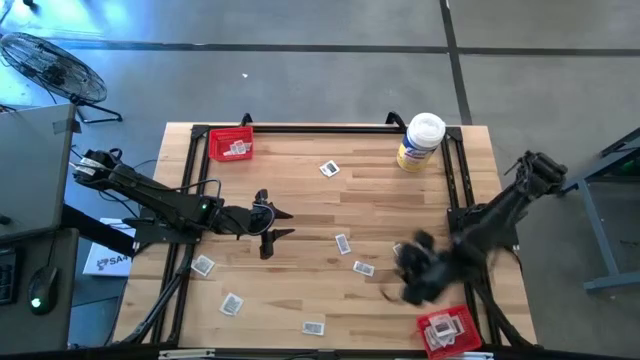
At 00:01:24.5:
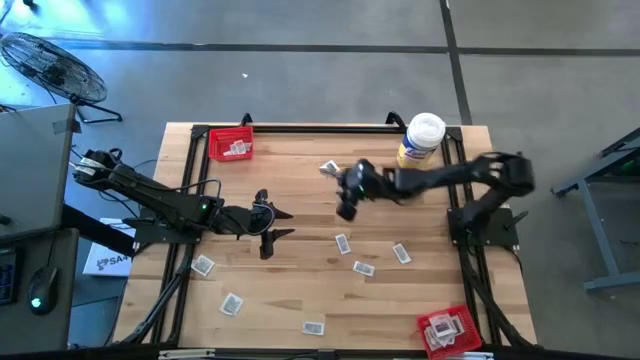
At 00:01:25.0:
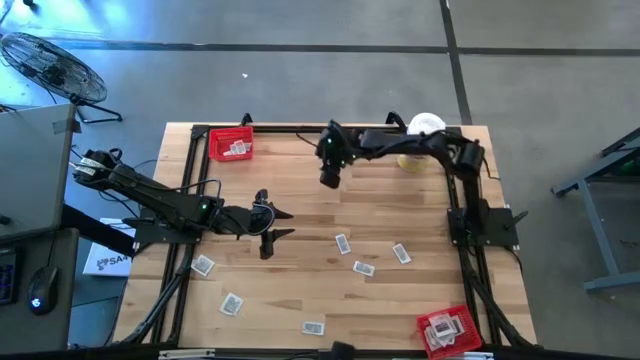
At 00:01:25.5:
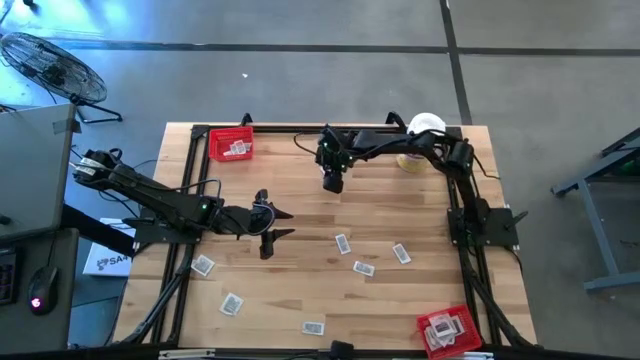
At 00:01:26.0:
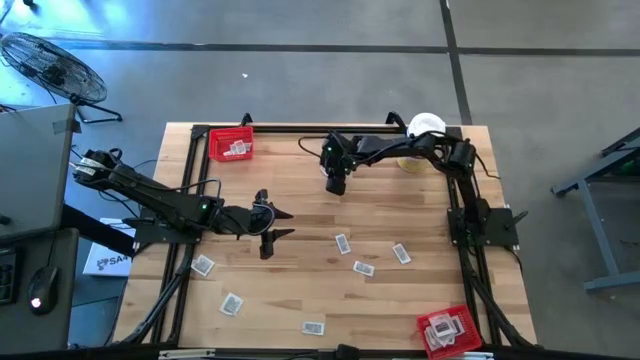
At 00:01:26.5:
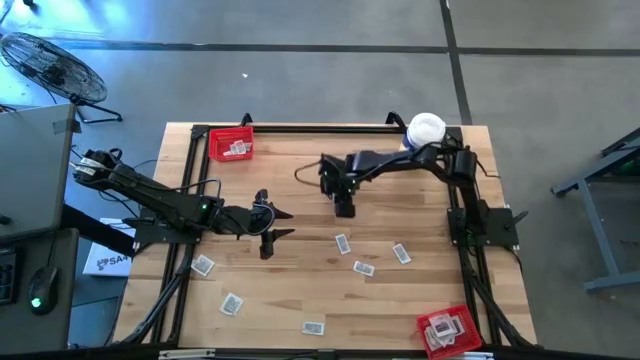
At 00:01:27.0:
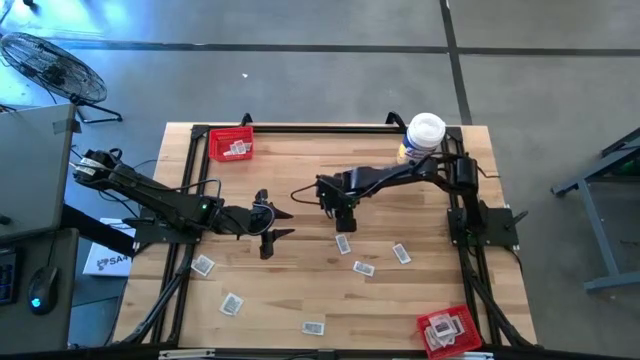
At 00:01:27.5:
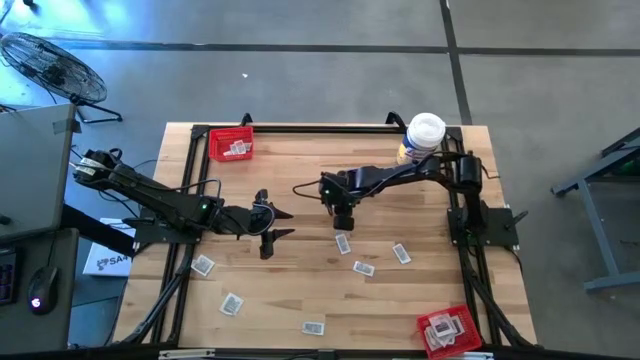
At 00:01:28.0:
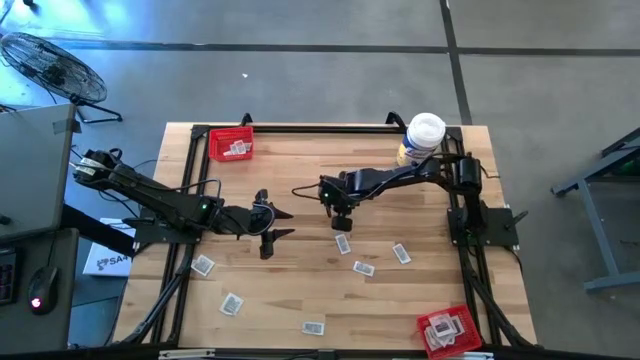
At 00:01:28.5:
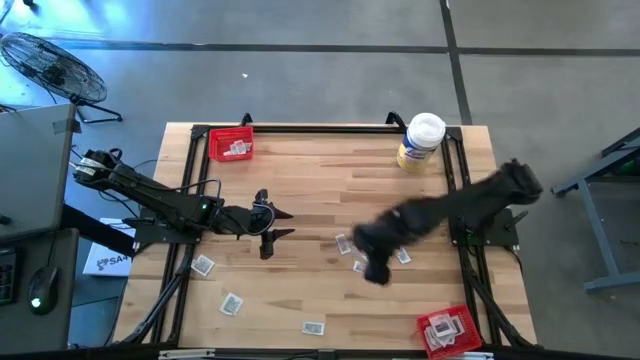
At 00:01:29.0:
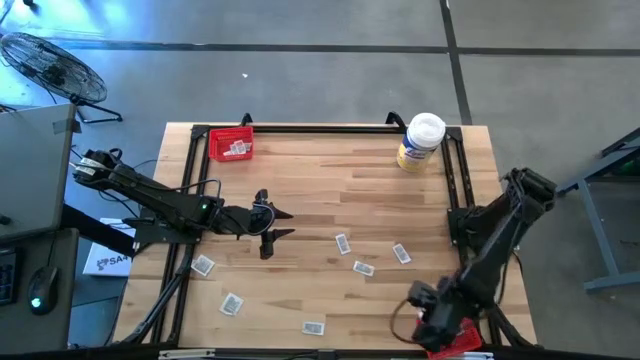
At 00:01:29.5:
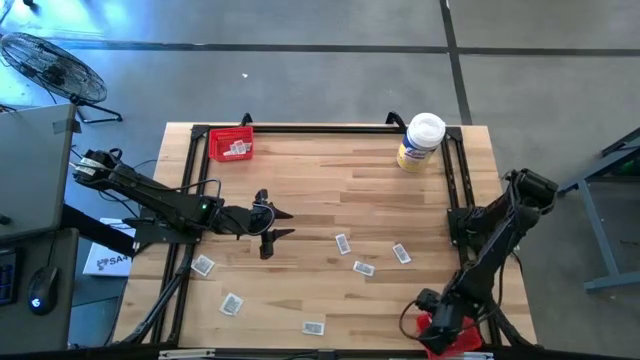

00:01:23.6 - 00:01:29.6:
Task: Pick & Place First Aid Supplies
Put the white and gray towelette pack into the bottom red bin

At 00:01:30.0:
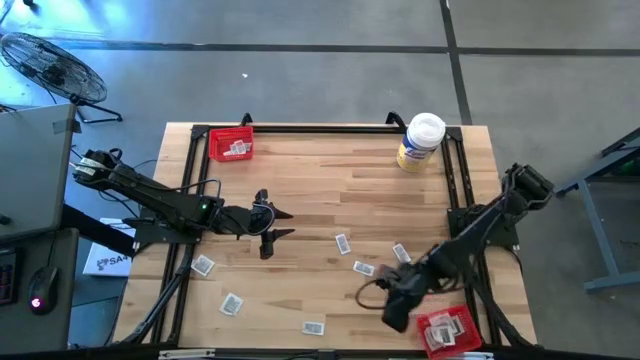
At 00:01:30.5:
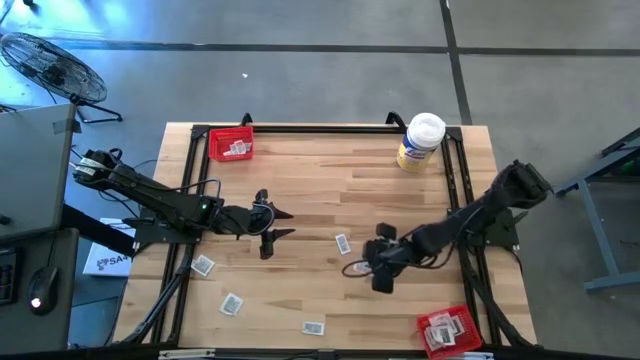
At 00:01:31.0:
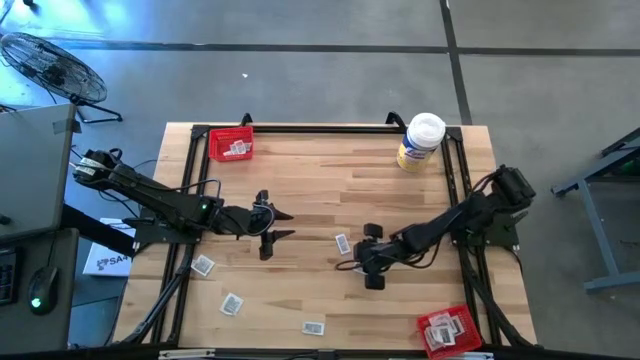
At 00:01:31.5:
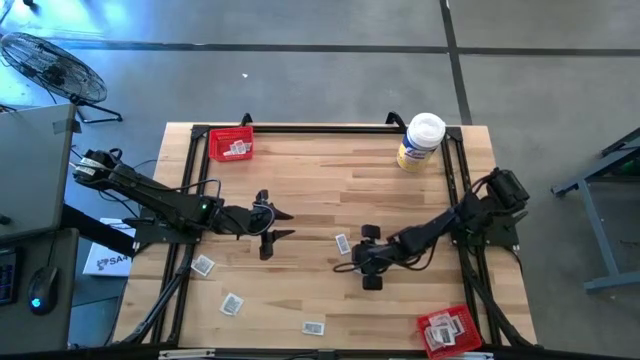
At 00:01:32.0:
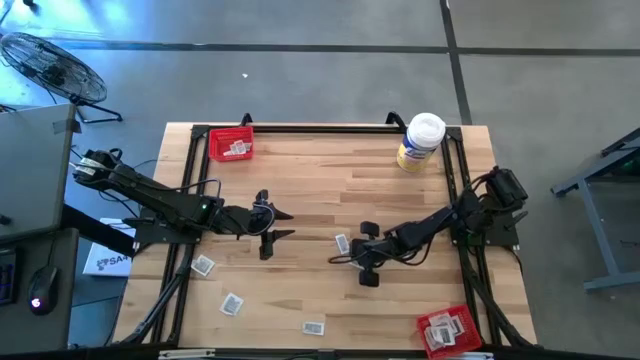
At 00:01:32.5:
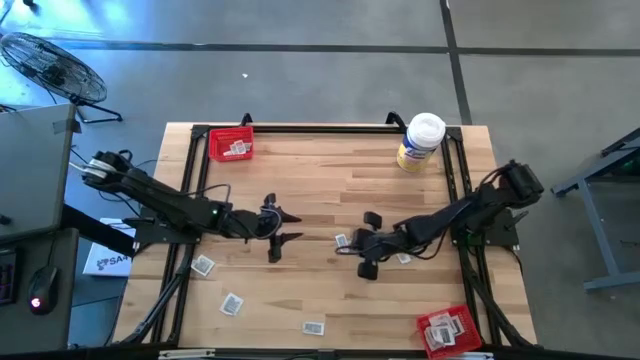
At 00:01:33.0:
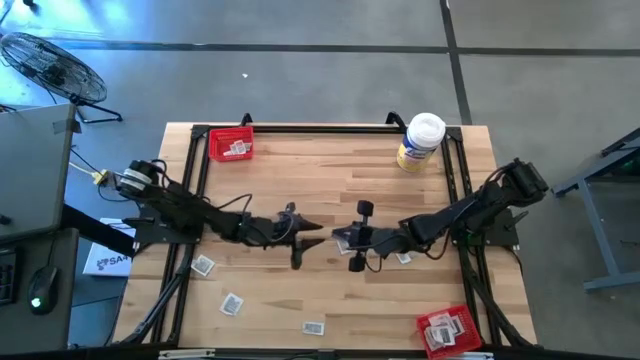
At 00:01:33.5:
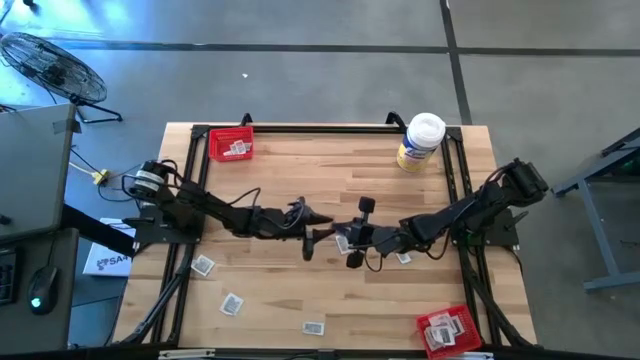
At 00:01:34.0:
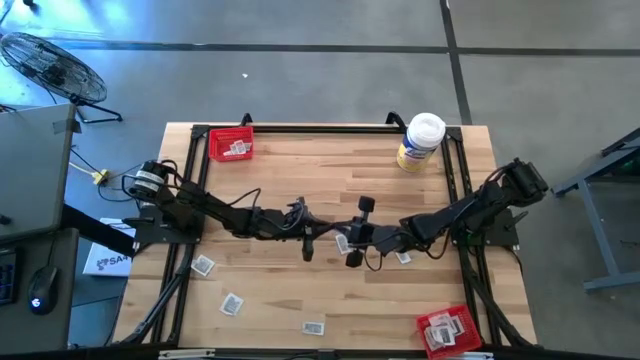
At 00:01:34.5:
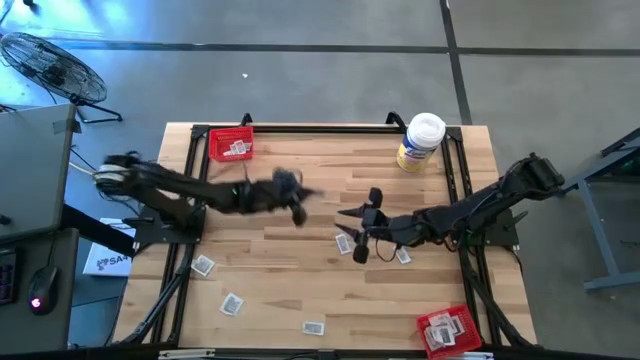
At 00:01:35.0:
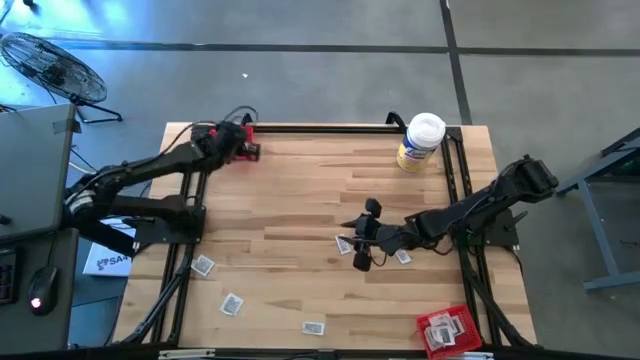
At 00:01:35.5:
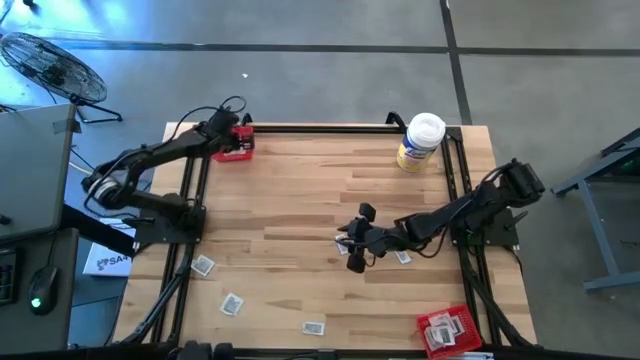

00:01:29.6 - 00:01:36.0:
Put the white and orange ointment pack into the top red bin

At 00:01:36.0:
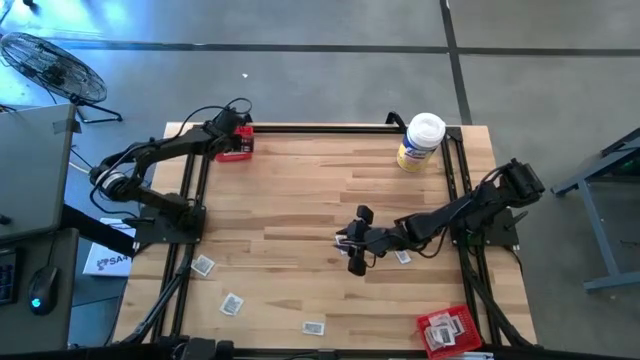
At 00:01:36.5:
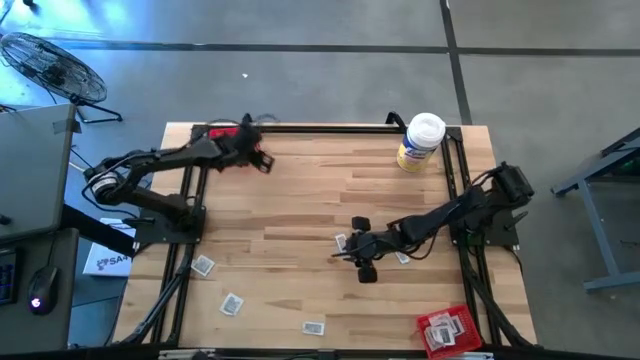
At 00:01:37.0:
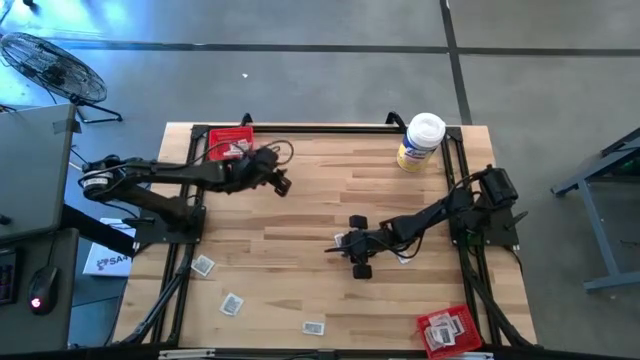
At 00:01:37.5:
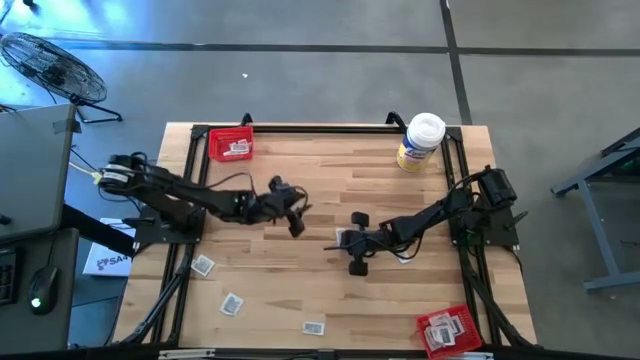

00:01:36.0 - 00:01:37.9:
Put the white and orange ointment pack into the top red bin

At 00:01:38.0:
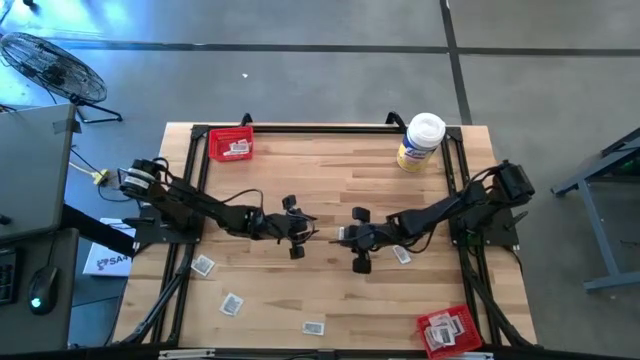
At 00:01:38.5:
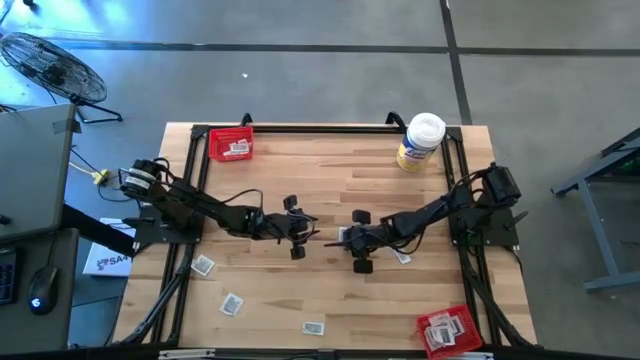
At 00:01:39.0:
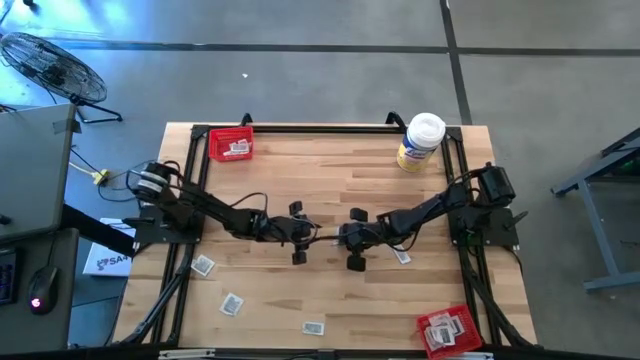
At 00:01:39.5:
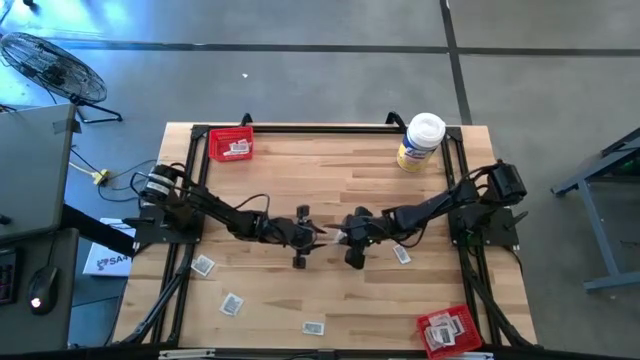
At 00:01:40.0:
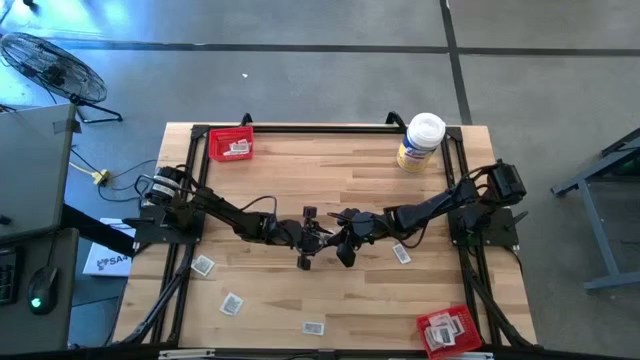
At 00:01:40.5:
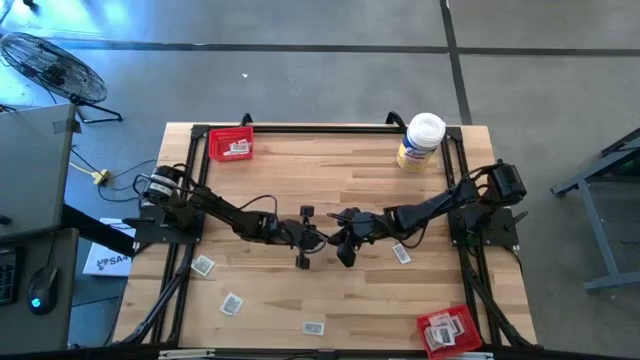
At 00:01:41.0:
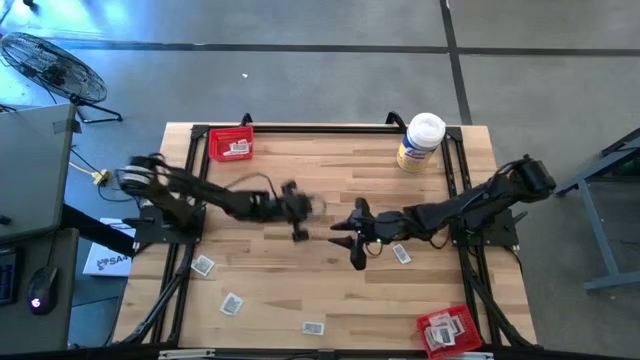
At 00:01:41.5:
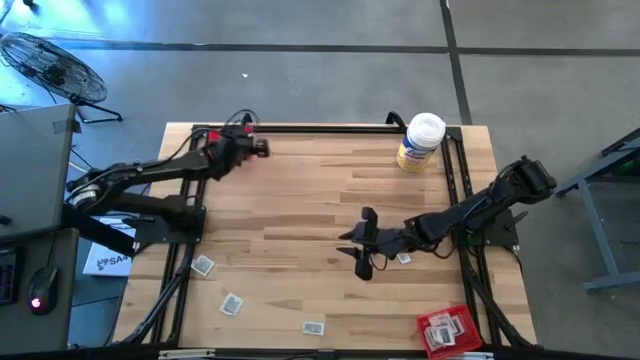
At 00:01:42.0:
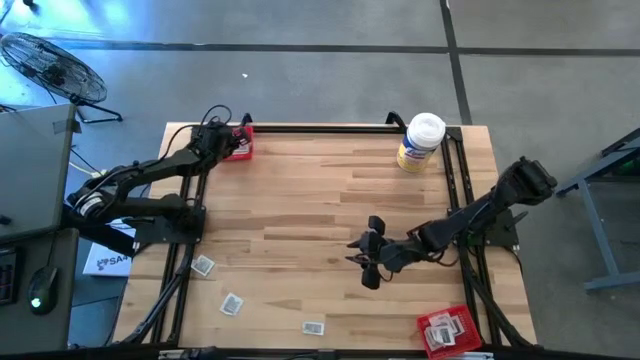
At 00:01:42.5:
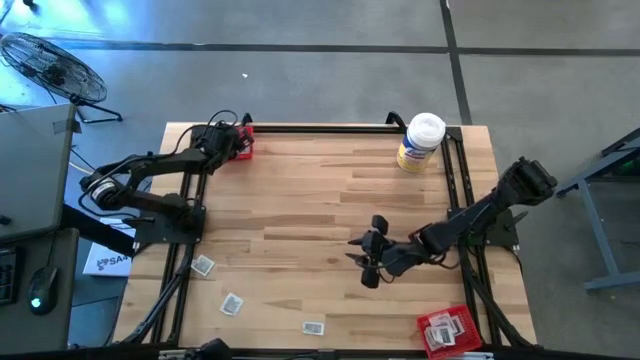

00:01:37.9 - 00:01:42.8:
Put the white and orange ointment pack into the top red bin

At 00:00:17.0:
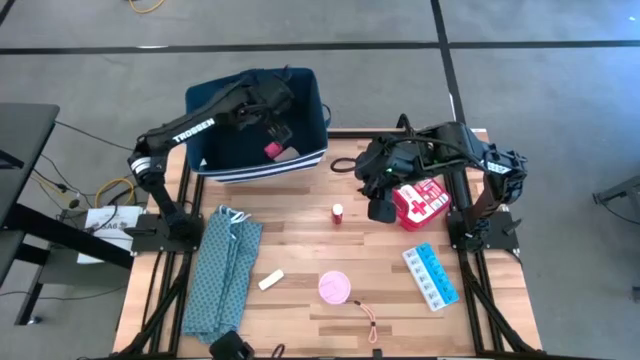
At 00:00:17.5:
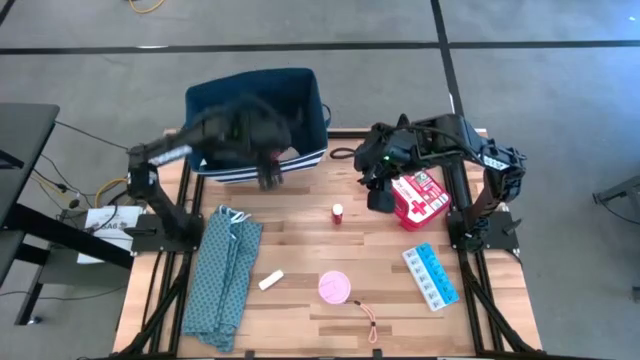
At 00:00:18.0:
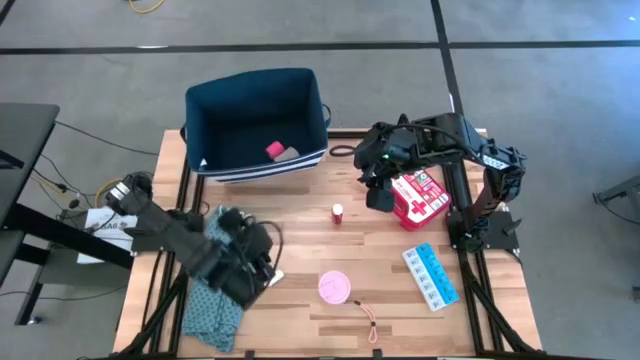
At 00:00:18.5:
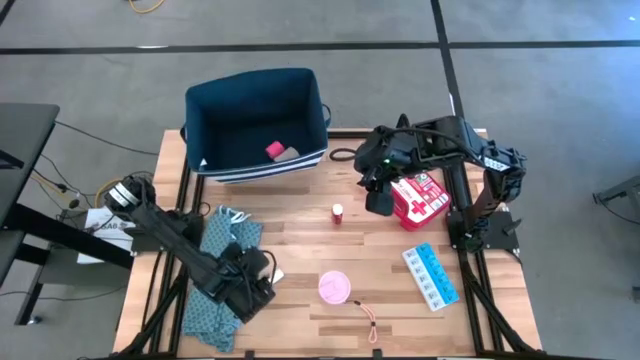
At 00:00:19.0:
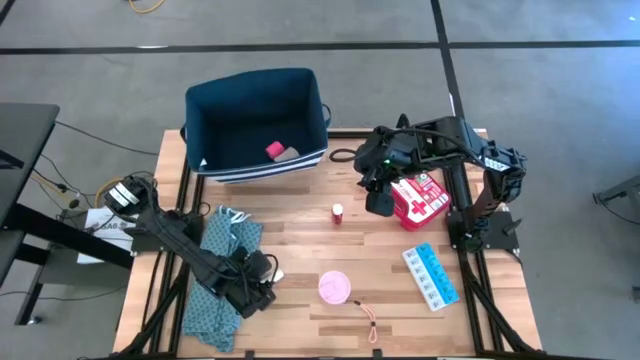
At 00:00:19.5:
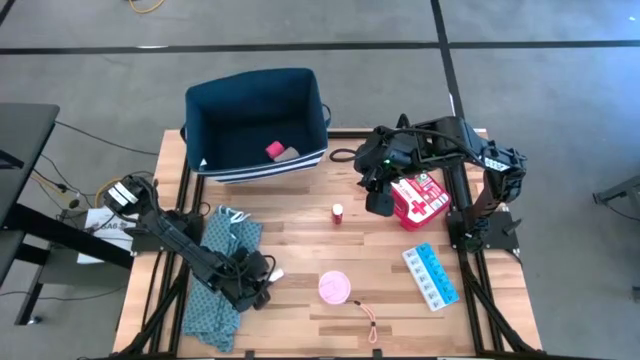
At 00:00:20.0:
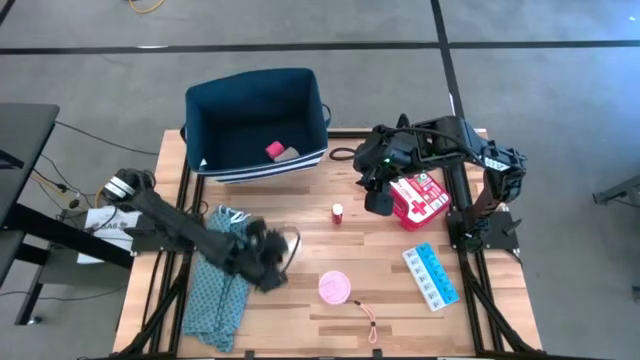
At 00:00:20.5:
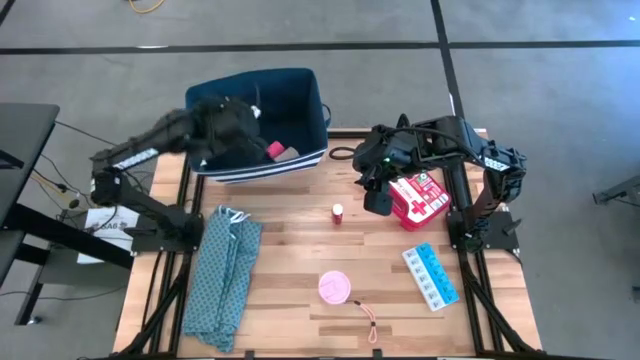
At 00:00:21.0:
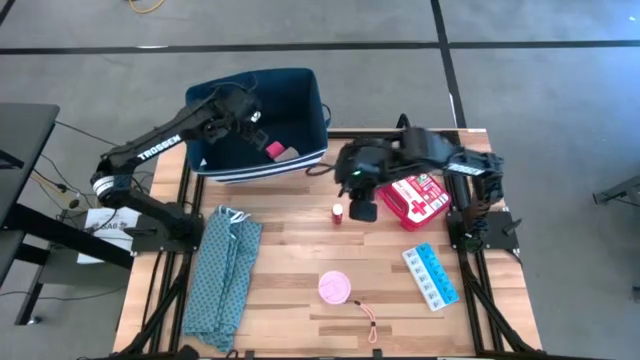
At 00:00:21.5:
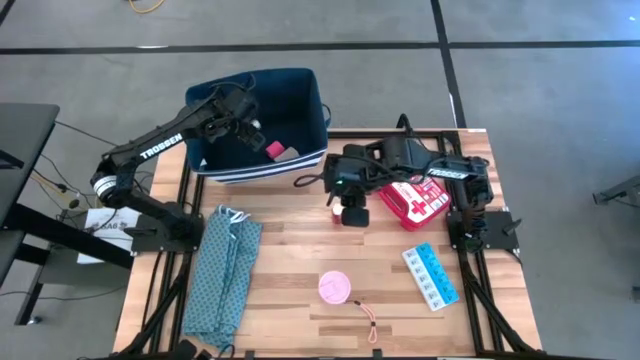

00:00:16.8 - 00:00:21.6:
Task: Pick & place medical supplies in basket/bin
Put the rolled gauze into theblue bin
